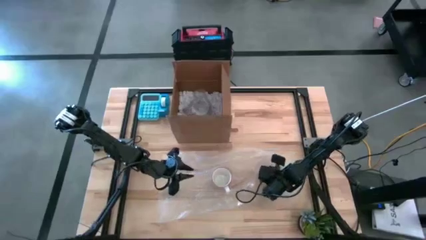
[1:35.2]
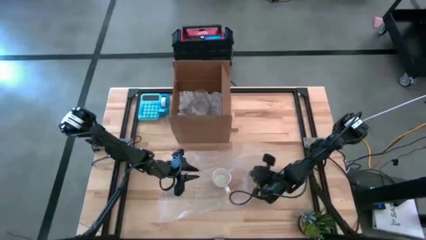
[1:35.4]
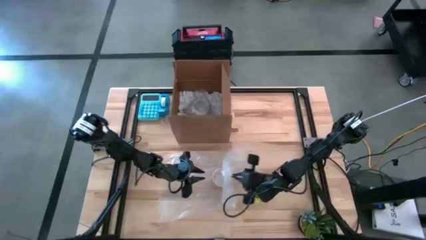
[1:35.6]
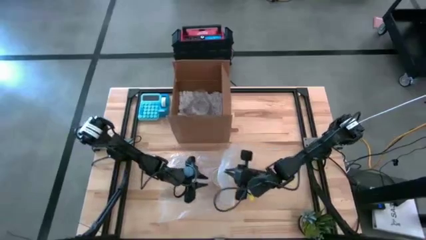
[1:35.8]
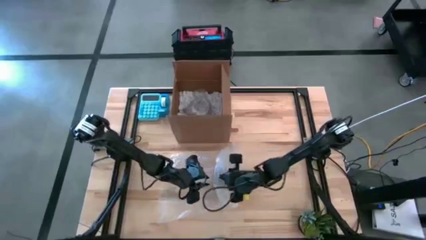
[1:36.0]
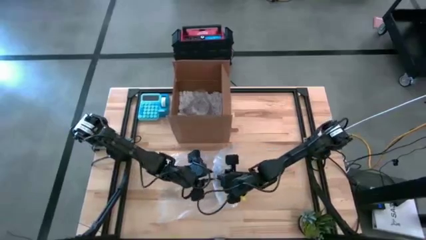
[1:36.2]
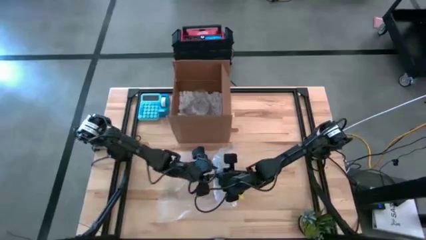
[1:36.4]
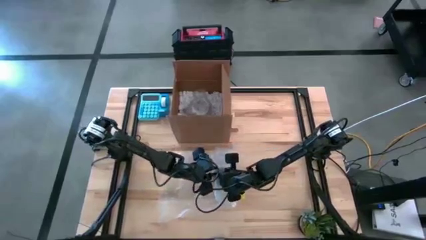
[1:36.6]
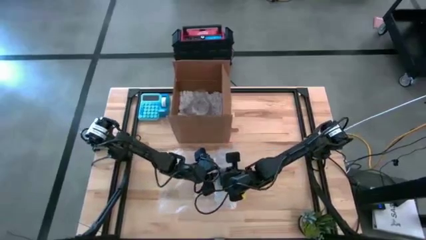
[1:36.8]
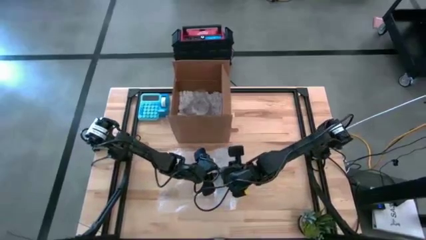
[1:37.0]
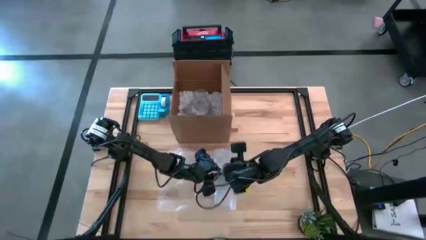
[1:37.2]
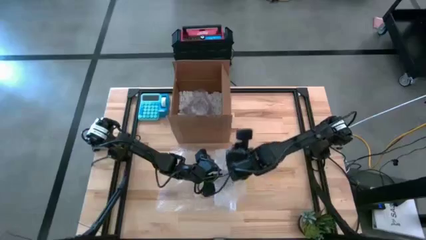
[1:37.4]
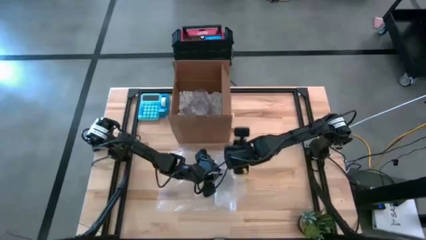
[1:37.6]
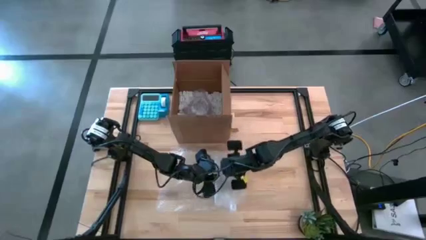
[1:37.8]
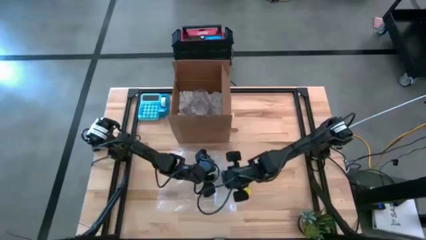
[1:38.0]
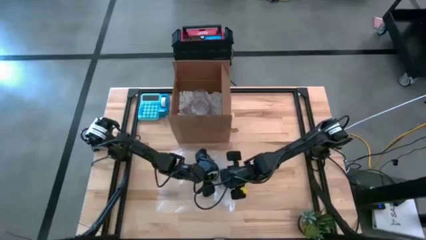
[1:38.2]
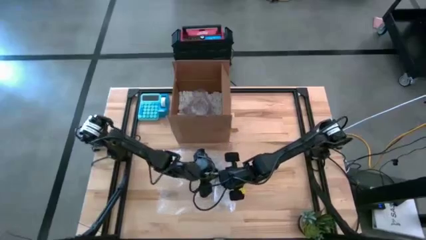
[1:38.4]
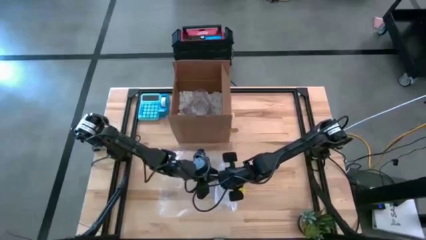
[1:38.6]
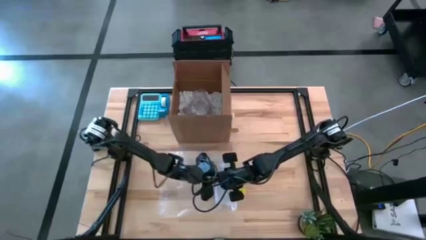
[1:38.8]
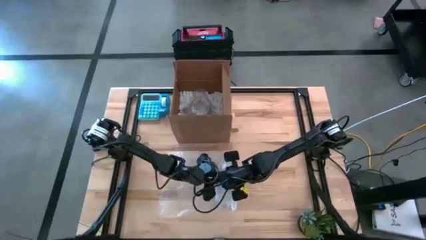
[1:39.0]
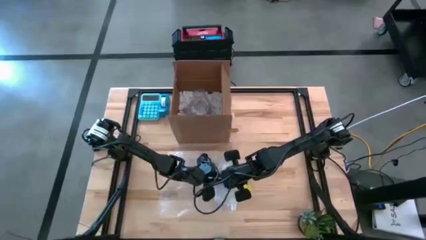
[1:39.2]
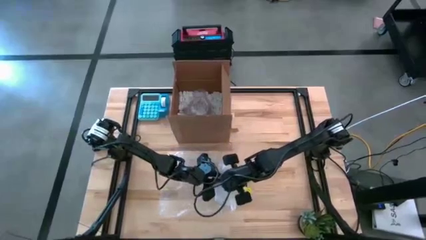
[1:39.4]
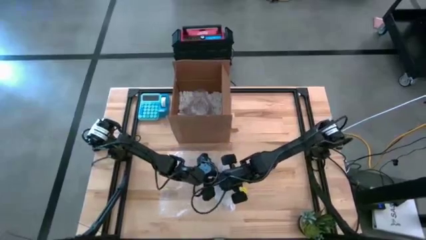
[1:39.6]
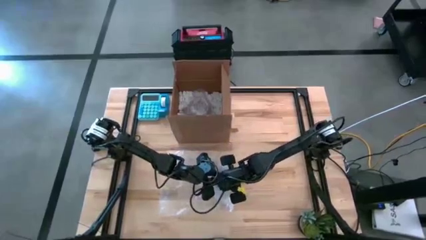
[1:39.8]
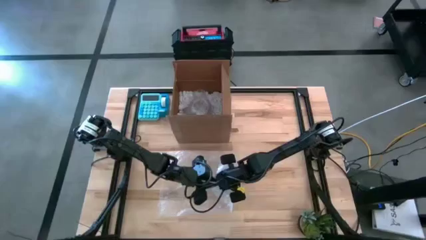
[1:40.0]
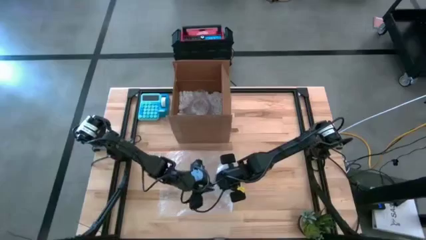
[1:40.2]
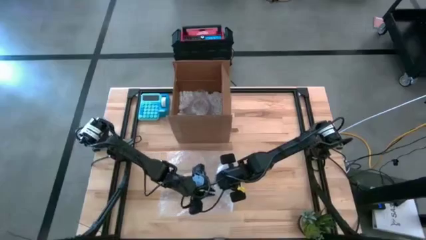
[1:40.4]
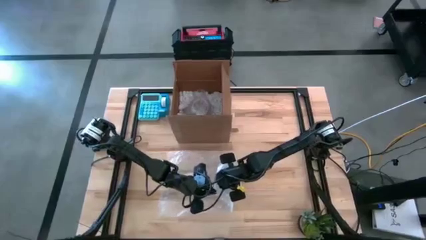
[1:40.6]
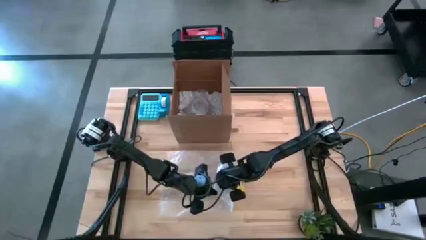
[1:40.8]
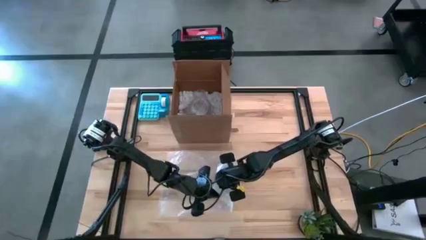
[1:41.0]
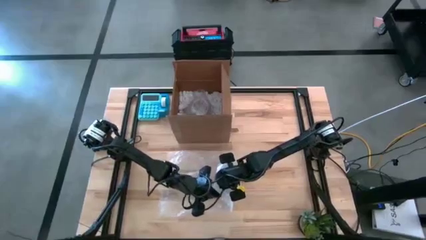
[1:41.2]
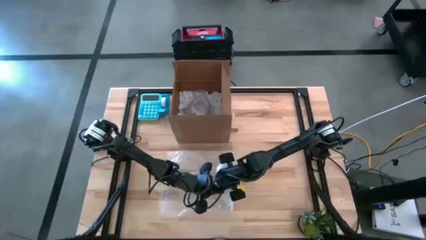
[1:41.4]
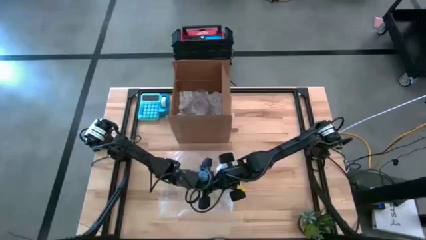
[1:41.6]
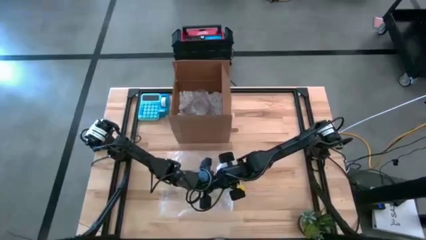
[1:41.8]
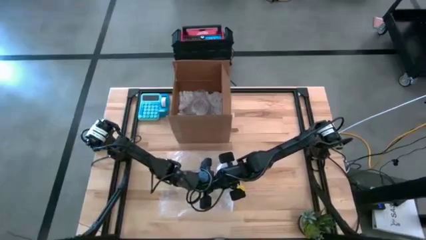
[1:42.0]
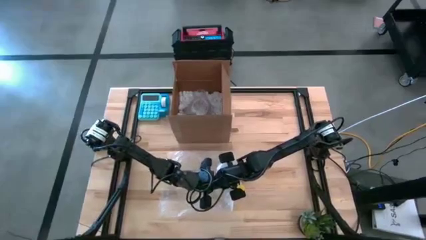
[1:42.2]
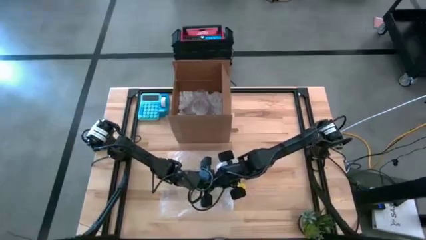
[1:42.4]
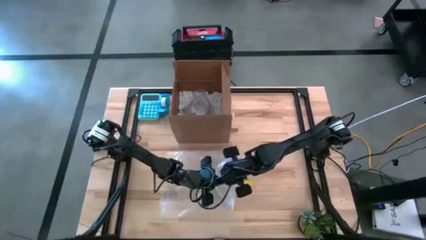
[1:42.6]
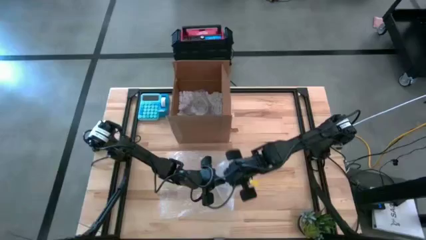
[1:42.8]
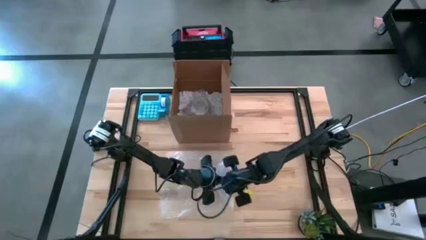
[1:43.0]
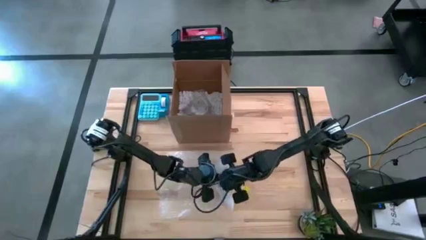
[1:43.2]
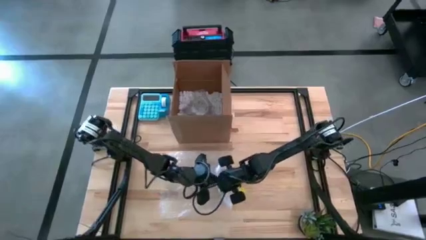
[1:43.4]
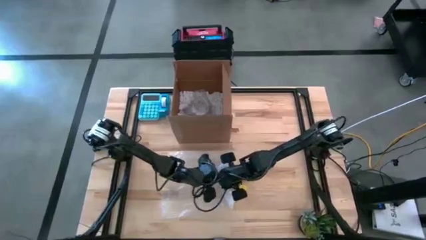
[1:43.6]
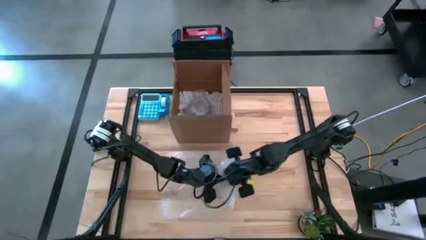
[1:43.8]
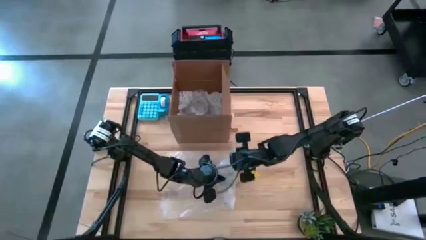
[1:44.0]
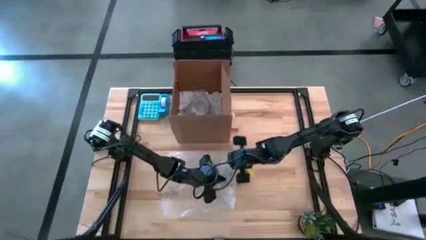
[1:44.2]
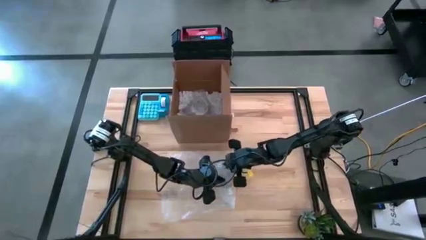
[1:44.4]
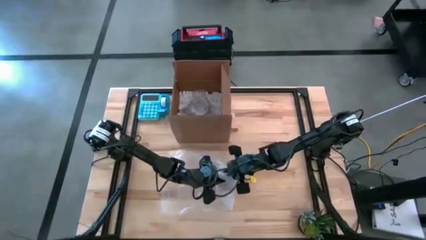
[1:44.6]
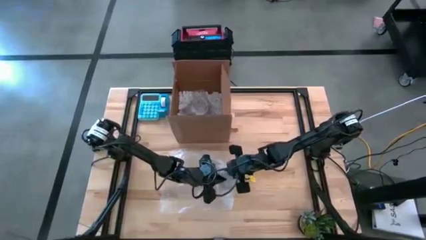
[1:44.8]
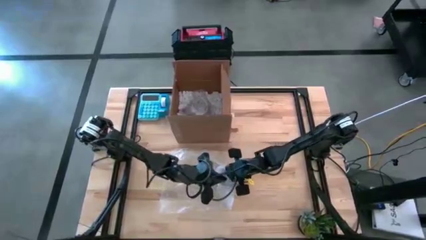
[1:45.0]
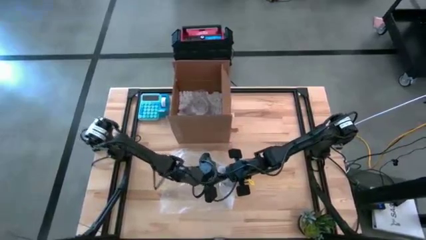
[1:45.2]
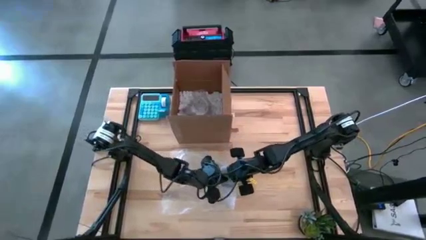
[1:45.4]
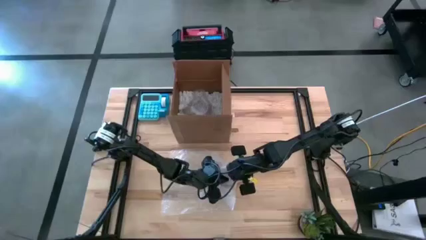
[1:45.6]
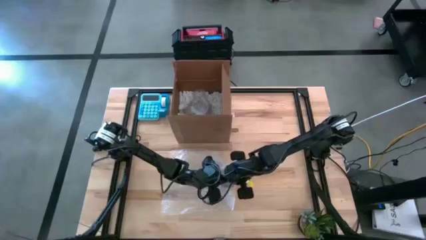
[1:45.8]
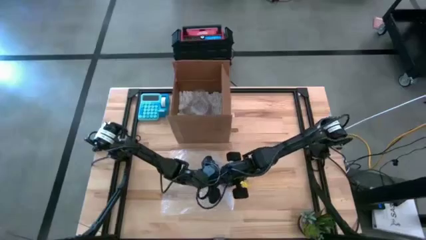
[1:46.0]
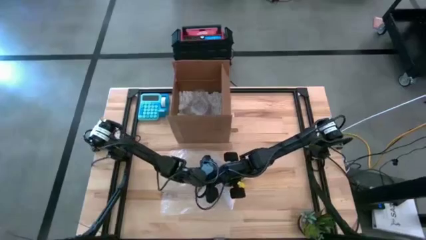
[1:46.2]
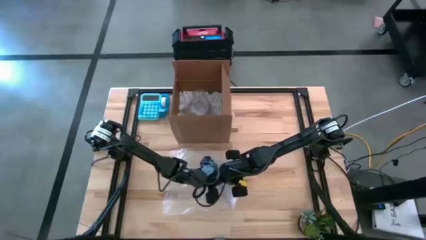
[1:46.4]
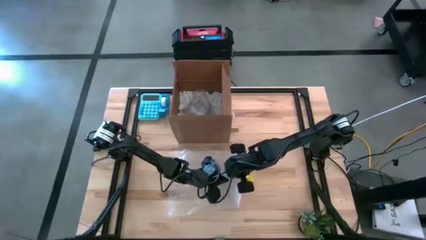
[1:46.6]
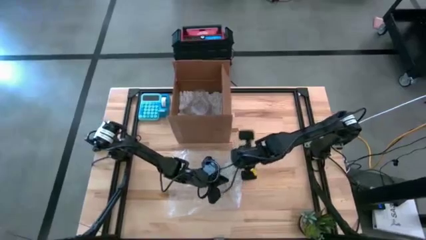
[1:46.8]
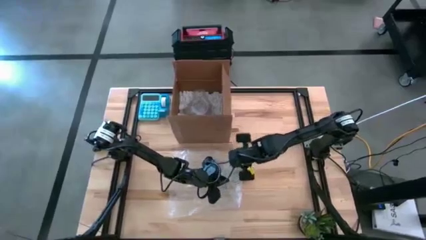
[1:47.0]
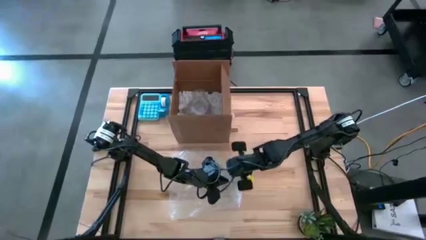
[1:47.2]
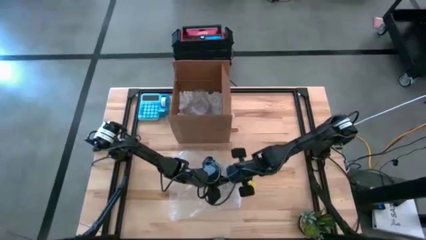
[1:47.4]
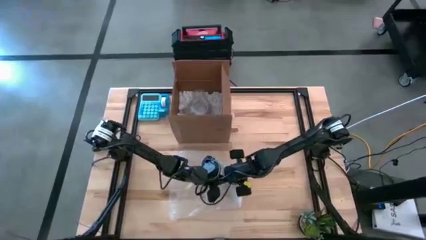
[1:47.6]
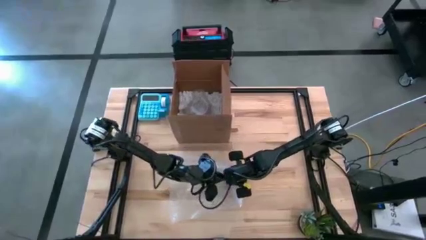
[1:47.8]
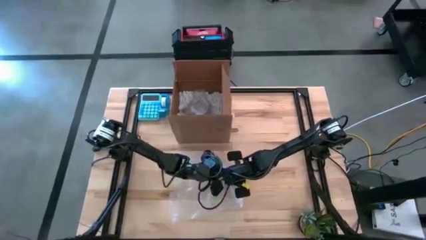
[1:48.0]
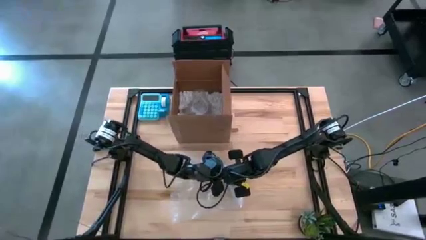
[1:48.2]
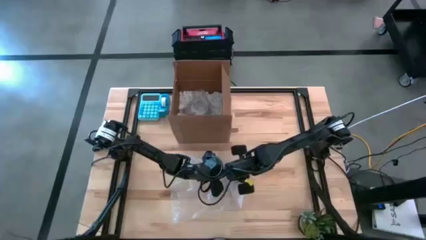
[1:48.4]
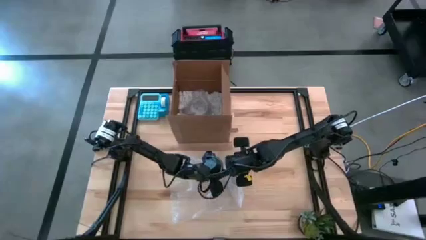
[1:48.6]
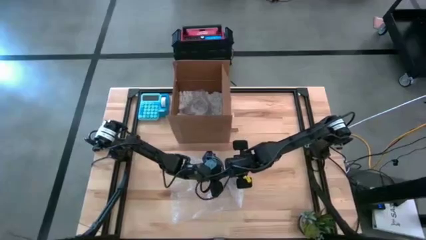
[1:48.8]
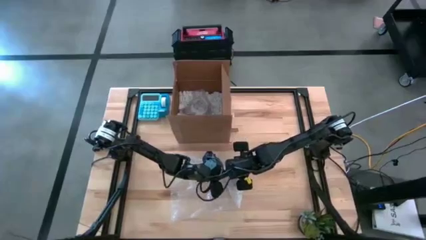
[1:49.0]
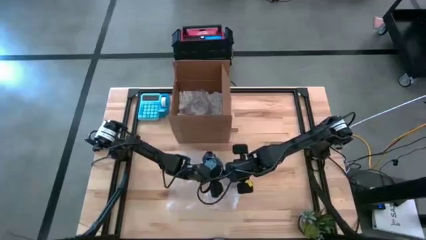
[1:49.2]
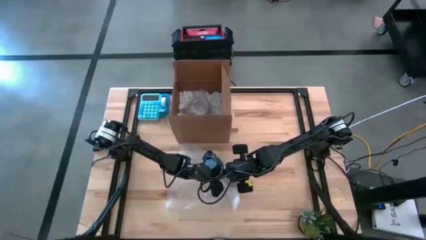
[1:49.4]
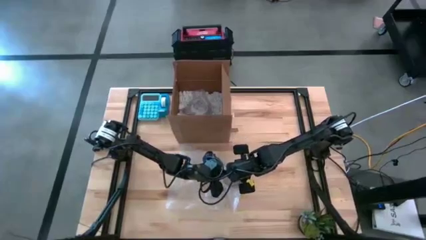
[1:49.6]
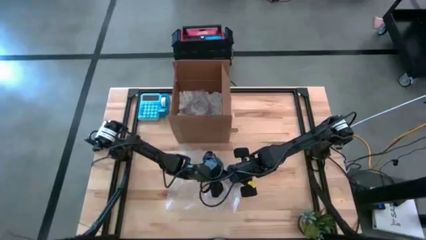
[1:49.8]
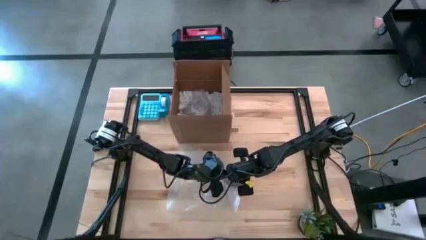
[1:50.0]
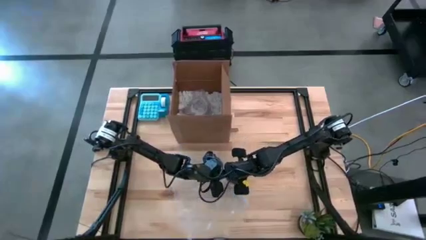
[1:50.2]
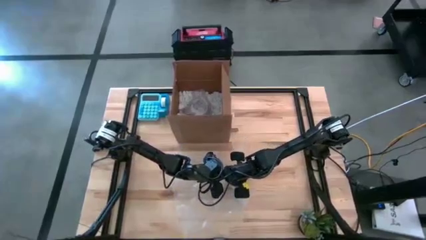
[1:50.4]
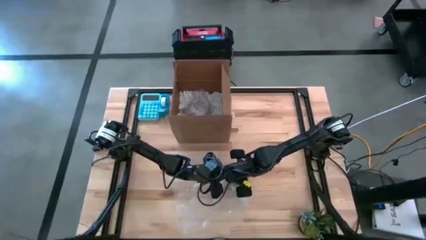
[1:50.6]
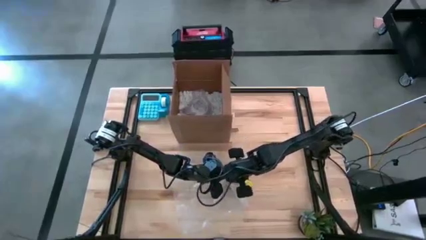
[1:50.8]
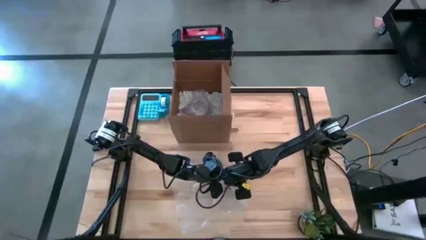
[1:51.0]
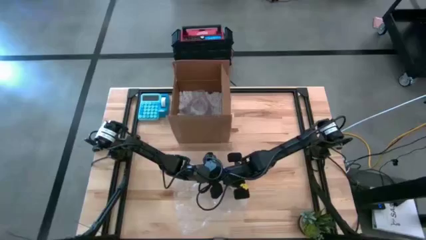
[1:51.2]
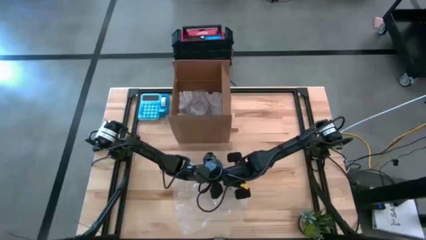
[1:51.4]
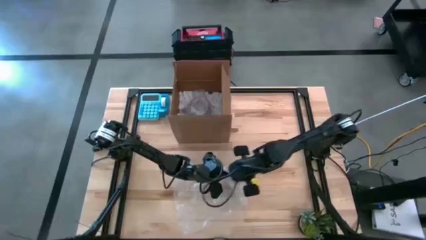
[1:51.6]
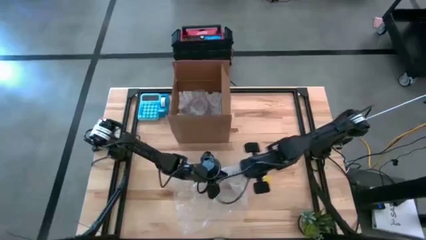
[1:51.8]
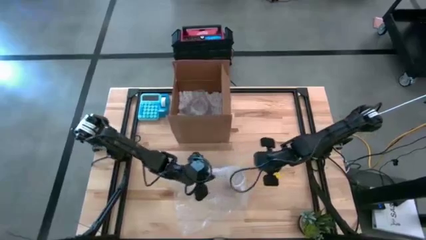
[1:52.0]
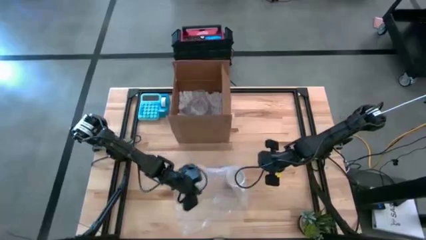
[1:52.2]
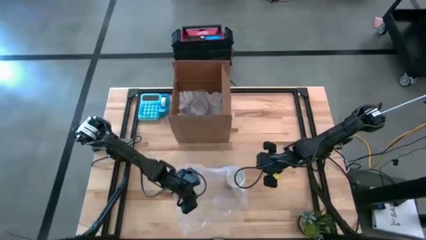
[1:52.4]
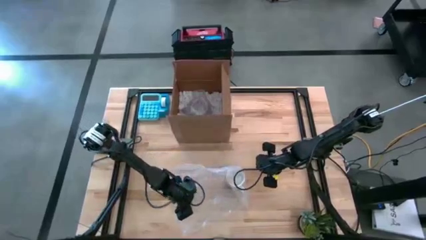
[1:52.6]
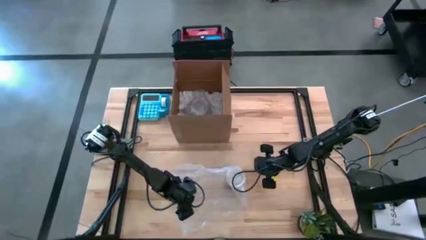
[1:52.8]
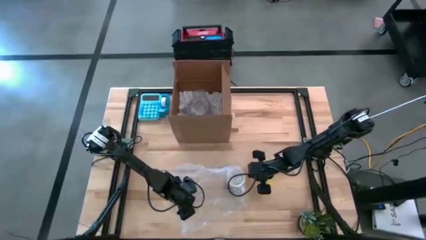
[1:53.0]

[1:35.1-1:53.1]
Task: wrap mug
Wrap the white mug using the bubble wrap
